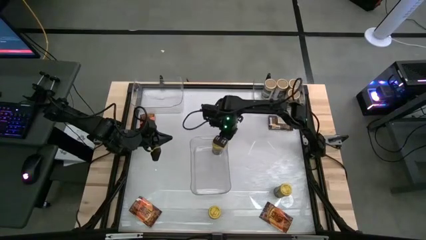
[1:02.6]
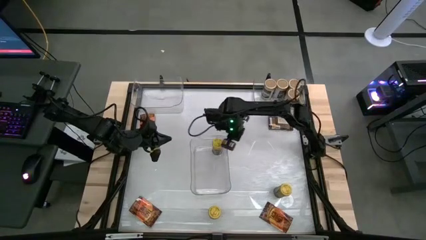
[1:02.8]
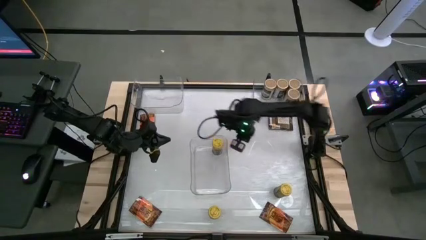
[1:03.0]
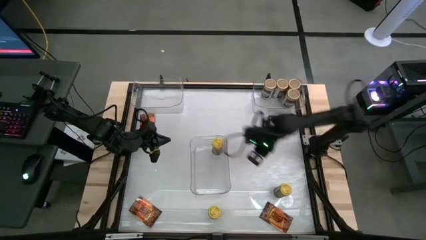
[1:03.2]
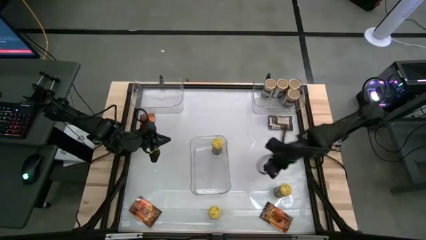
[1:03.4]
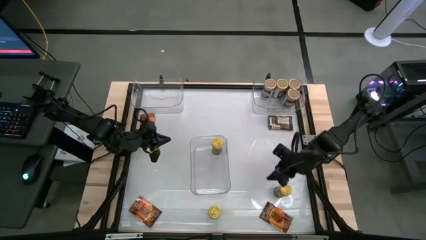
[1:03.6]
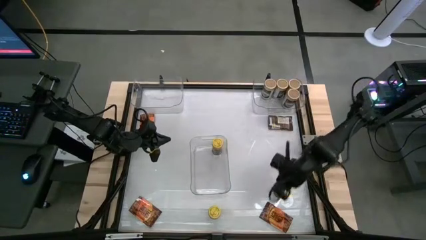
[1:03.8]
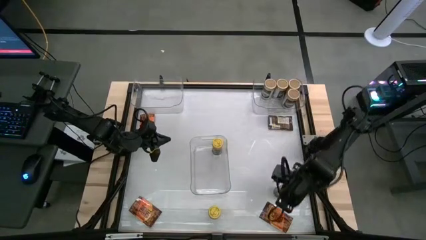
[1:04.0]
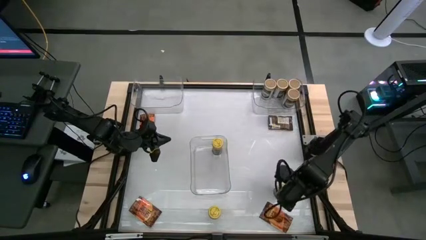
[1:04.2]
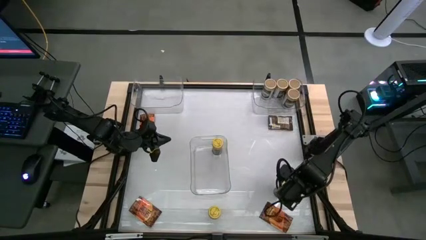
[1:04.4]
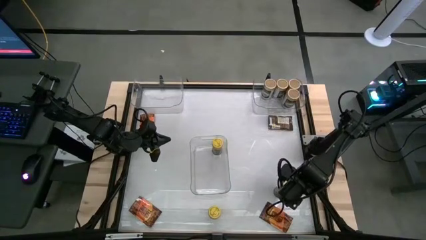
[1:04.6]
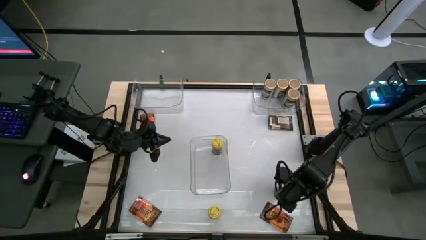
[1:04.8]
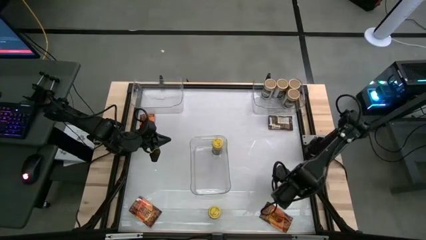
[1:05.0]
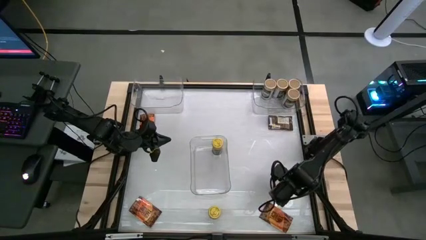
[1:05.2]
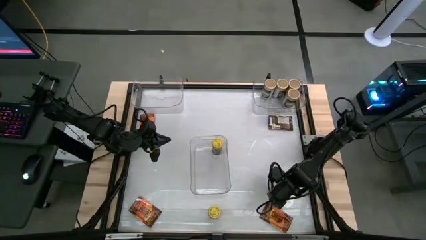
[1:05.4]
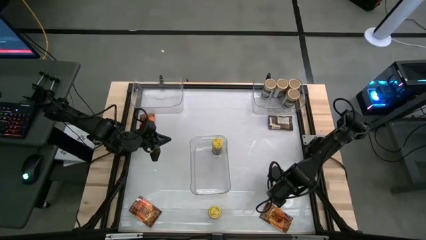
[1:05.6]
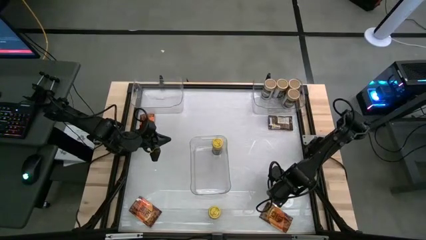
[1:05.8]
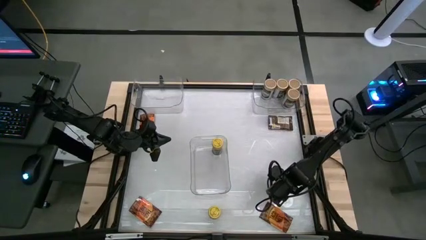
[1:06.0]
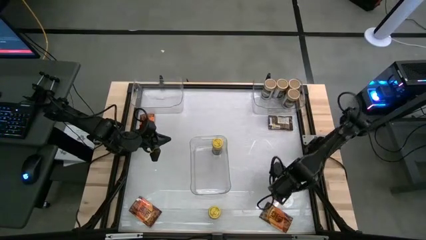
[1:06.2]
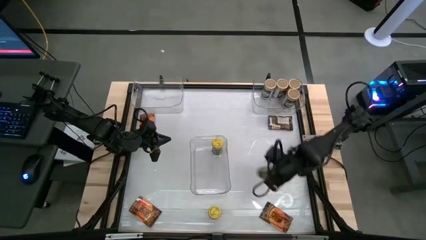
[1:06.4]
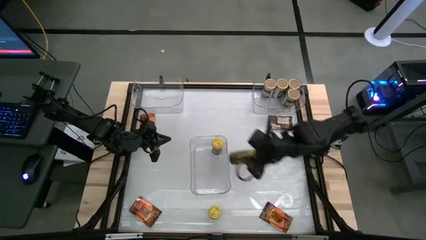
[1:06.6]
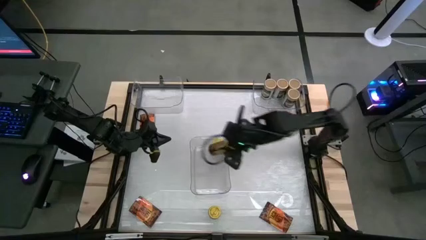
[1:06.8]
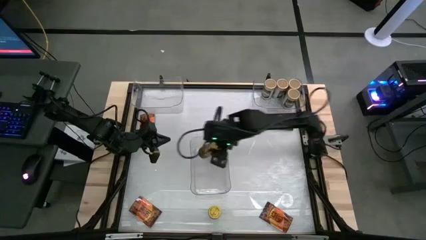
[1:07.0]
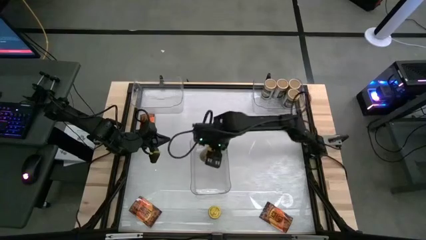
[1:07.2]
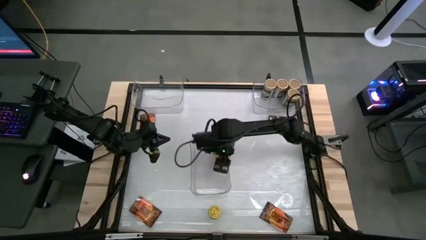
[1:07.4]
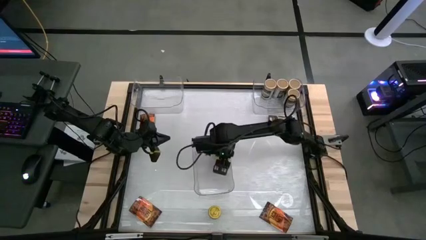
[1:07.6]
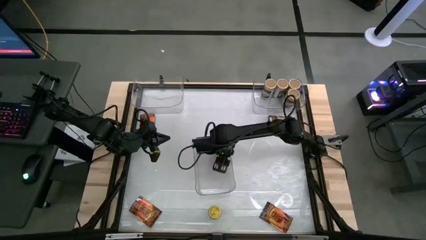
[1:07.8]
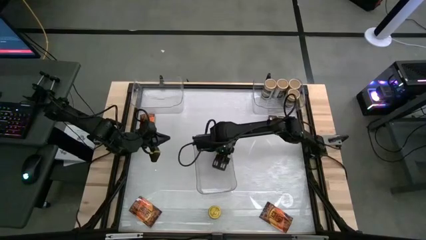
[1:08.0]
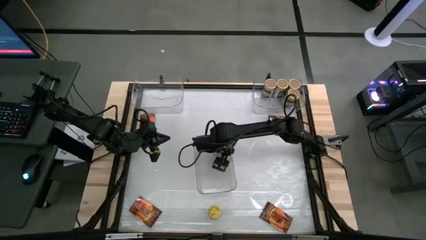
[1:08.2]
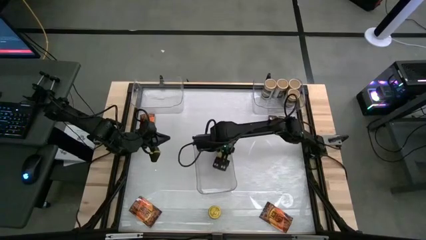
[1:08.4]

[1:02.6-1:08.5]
Task: Sort spices by type
Put the right yellow seasoning bottle into the transparent bin aligned with the other yellow seasoning bottle

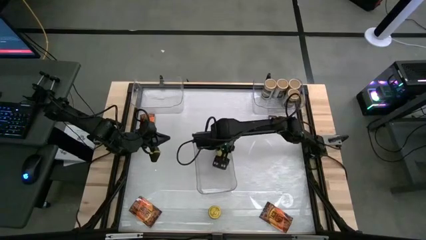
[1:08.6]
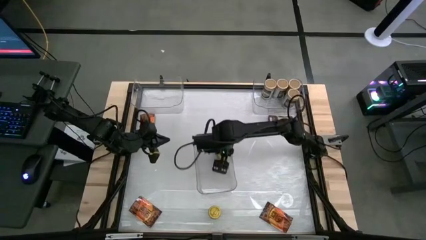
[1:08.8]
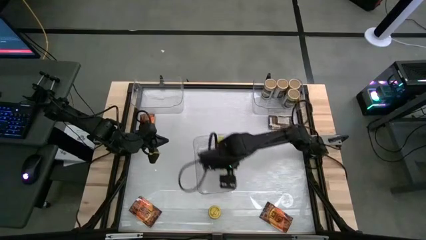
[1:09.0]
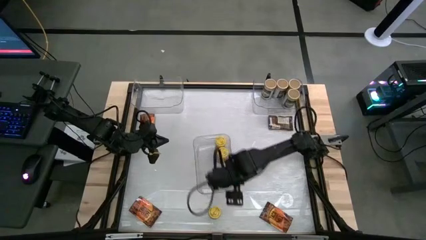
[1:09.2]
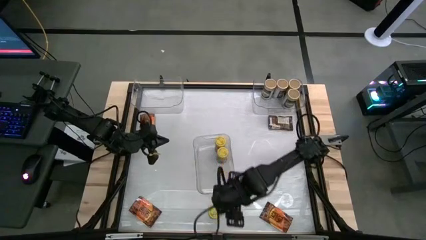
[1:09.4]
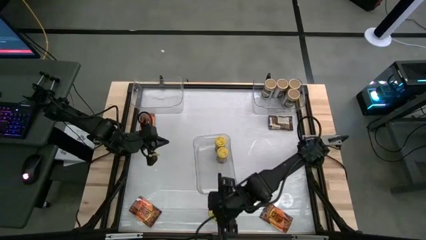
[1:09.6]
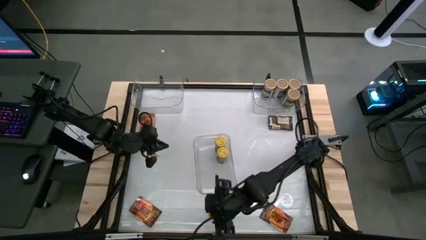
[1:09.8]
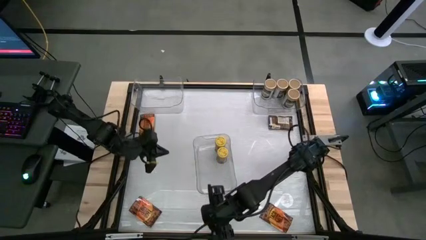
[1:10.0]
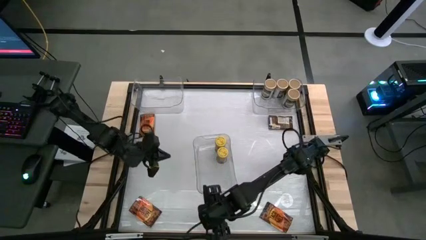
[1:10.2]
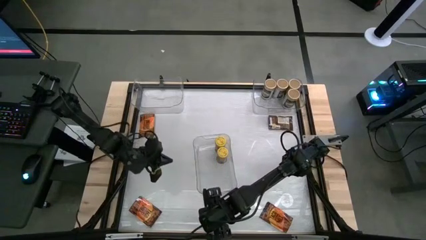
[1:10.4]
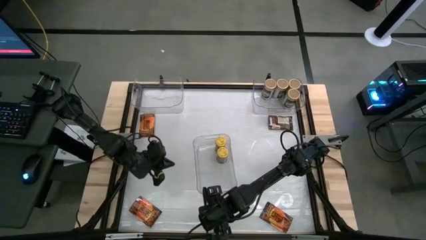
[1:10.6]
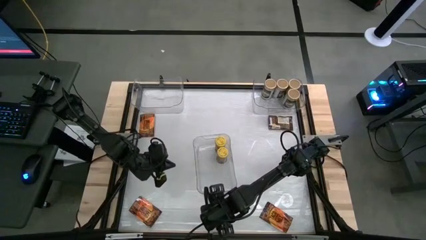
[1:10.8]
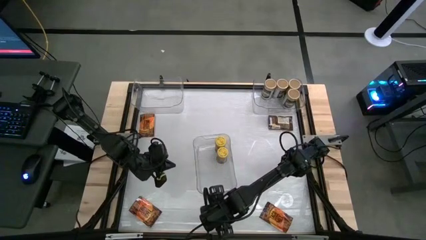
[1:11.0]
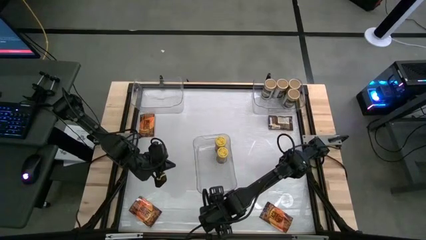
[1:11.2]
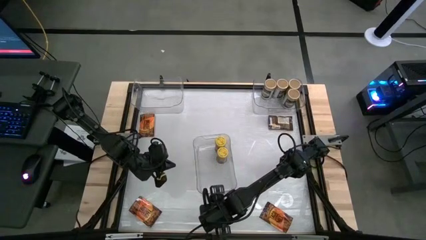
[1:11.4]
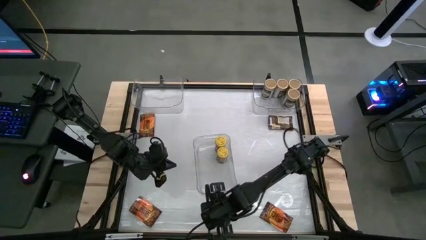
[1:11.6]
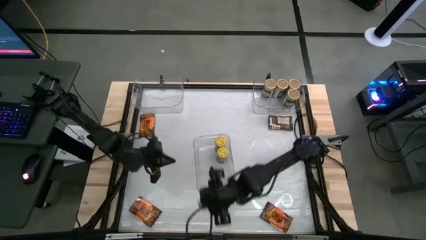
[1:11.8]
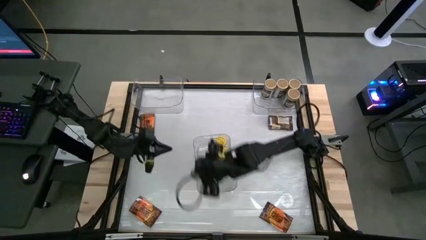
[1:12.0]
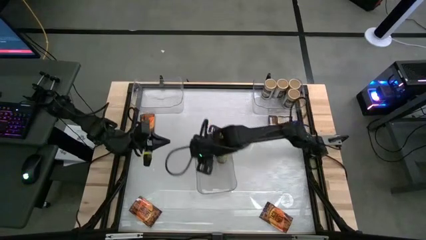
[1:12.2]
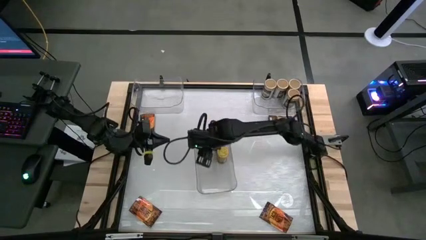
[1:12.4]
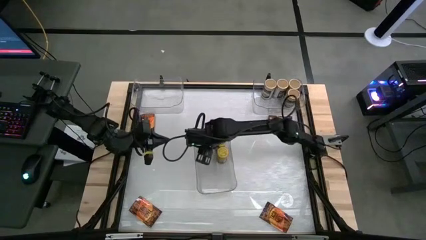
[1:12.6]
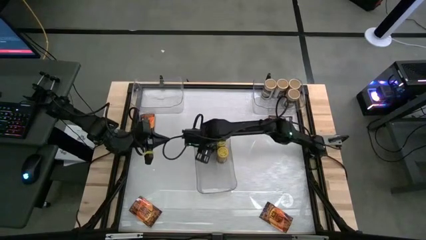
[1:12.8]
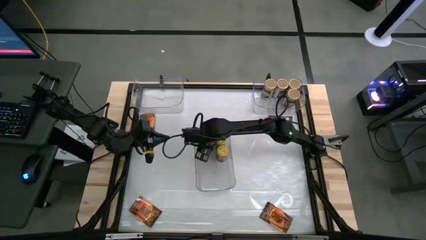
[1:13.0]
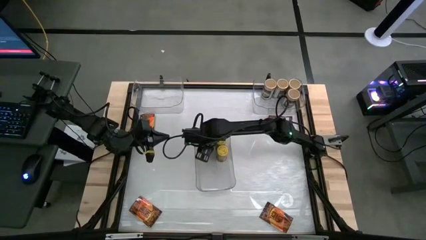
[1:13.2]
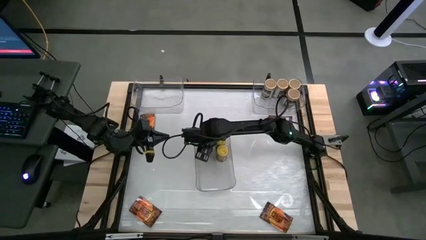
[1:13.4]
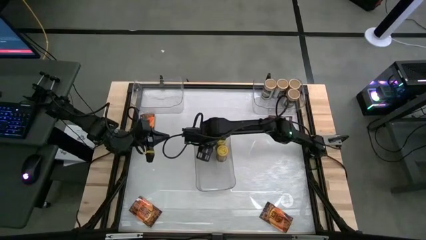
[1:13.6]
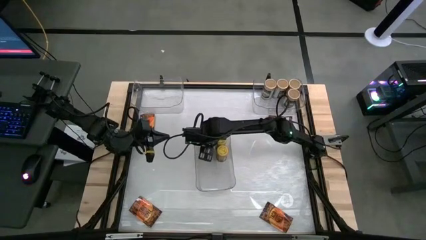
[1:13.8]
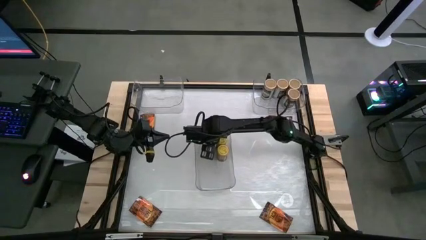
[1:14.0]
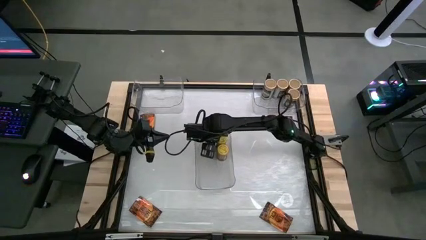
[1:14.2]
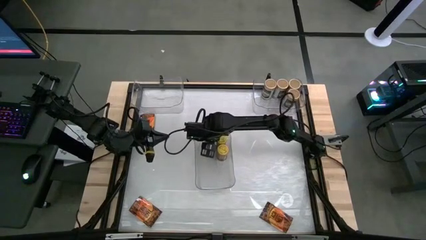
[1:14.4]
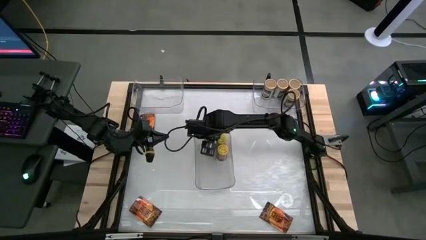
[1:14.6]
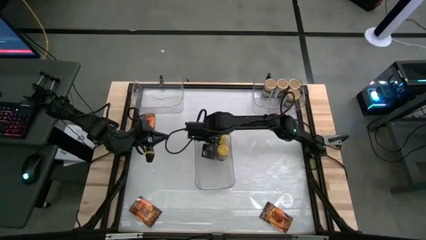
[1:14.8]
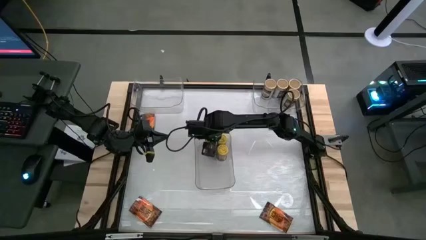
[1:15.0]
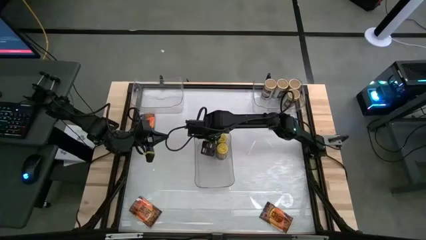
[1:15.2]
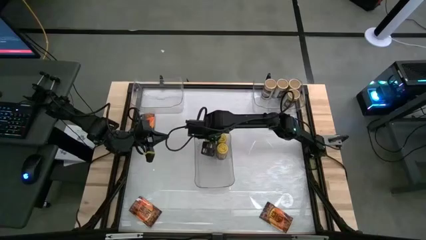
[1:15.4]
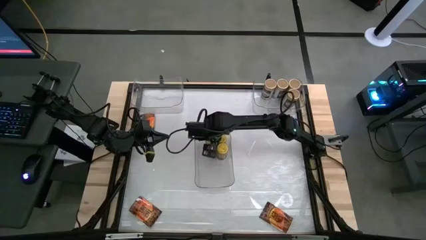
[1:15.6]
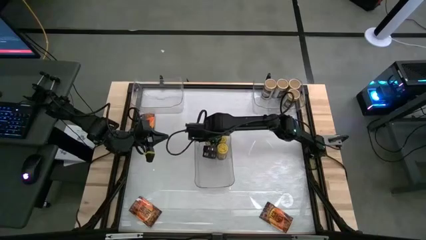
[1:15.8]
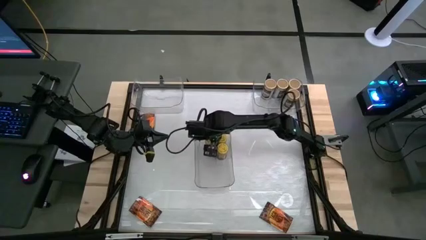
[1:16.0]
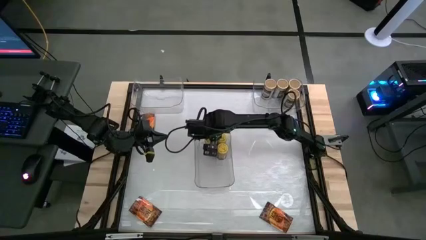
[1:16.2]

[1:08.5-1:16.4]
Put the yellow seasoning bottle into the bottom transparent bin to the left of the other yellow seasoning bottles

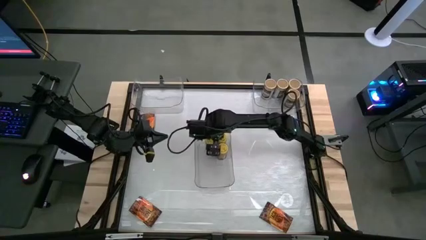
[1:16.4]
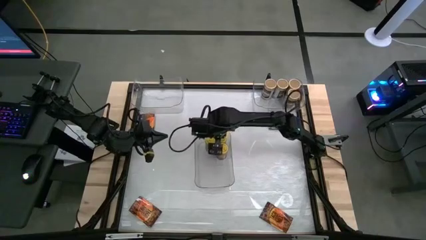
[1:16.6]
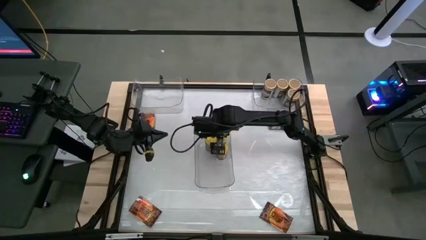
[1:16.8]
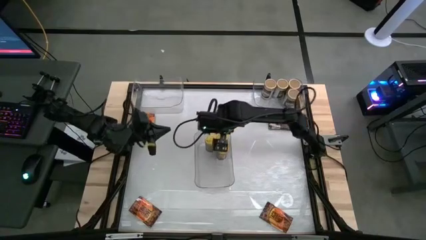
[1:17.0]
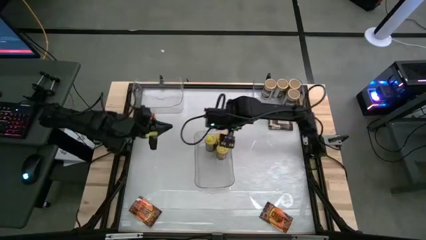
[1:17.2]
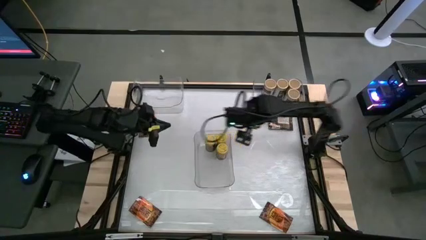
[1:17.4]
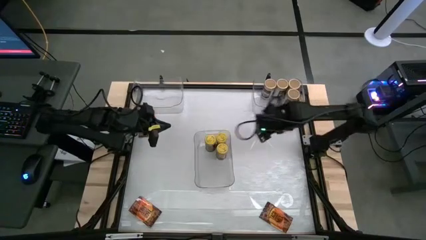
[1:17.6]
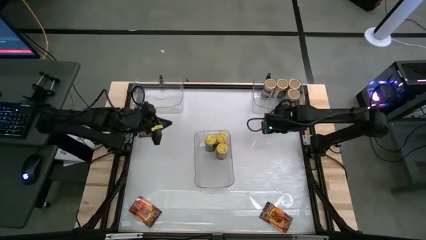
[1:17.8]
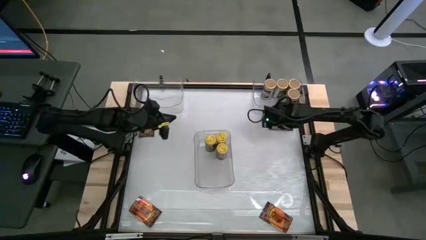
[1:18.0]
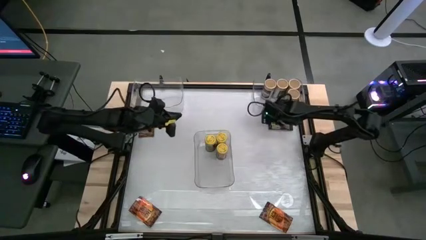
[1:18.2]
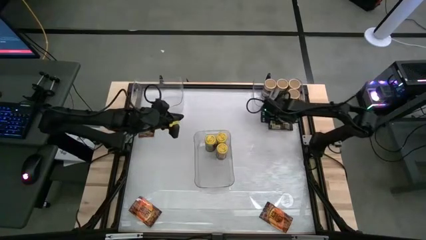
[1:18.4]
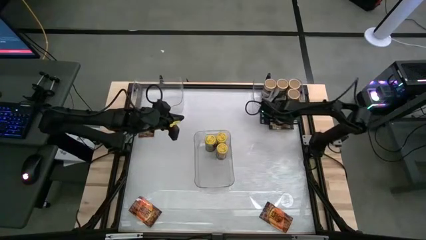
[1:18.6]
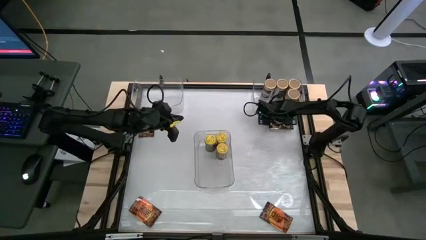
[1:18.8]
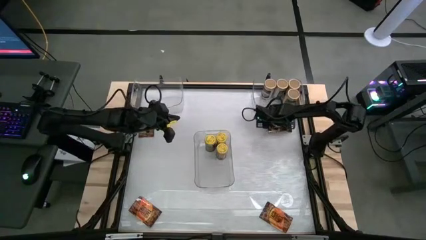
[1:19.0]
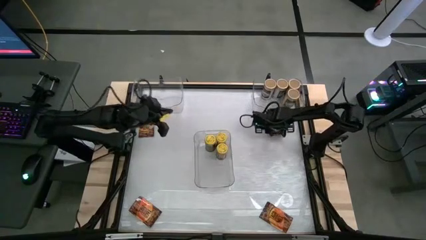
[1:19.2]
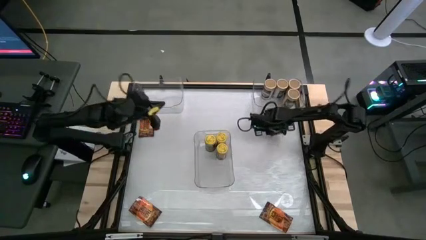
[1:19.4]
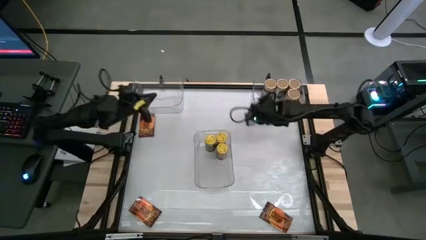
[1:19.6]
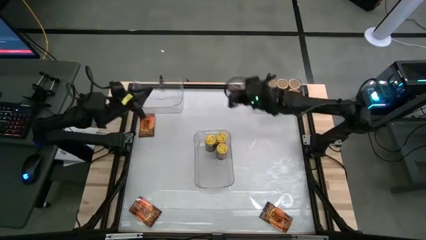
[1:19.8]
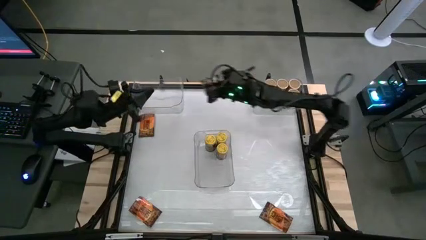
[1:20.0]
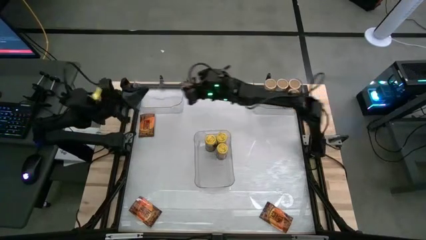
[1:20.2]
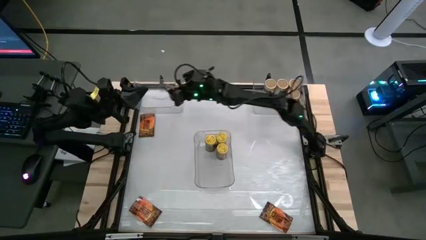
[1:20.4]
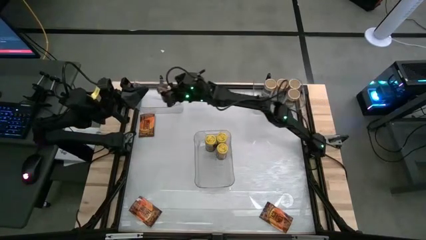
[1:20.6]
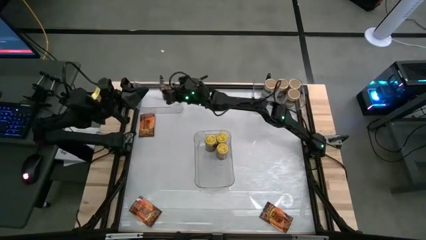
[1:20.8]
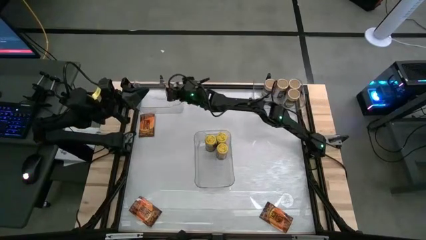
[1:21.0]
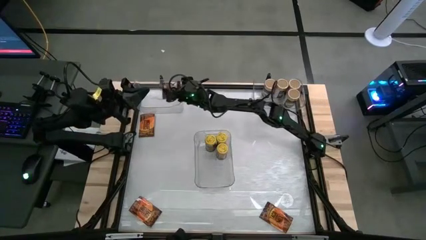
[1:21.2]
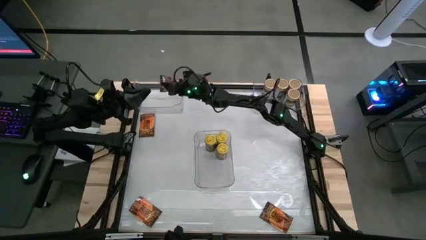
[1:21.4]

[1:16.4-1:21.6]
Put the top right brown seasoning bag into the left transparent bin
